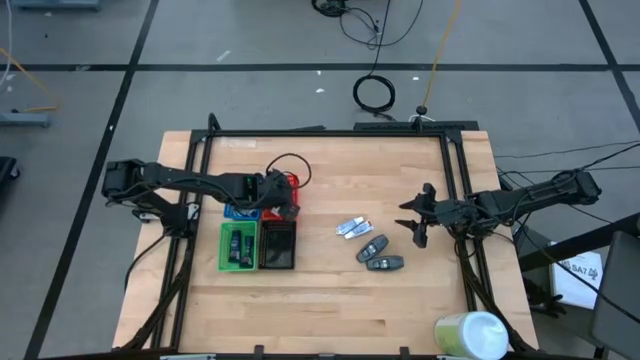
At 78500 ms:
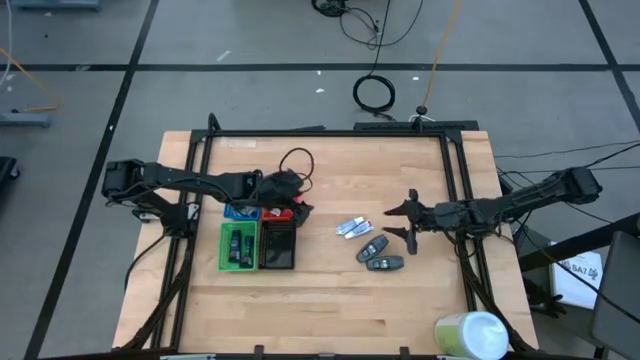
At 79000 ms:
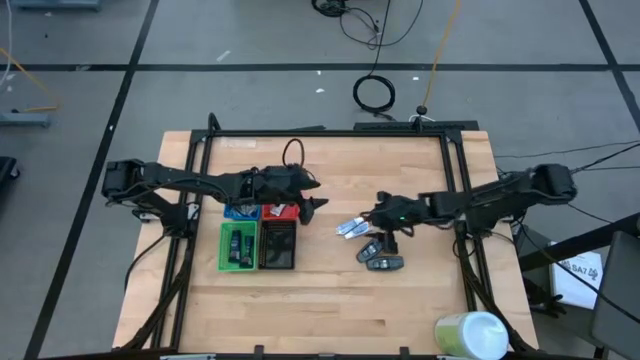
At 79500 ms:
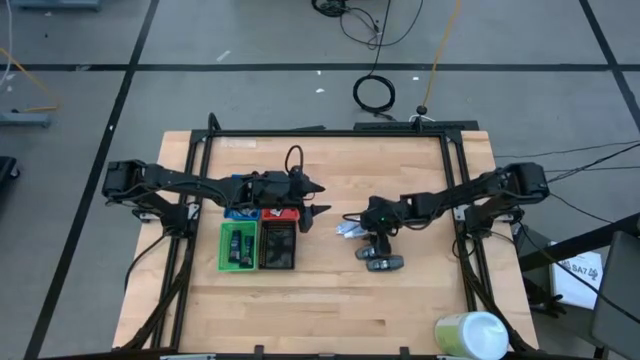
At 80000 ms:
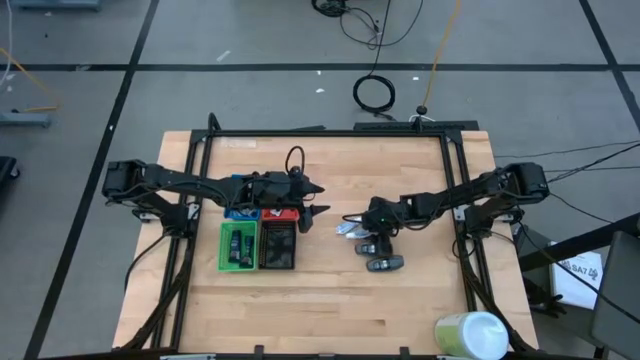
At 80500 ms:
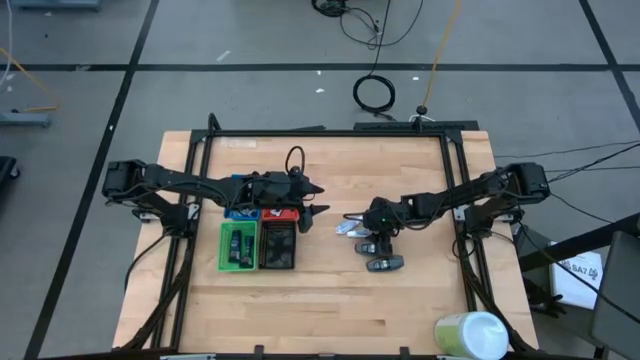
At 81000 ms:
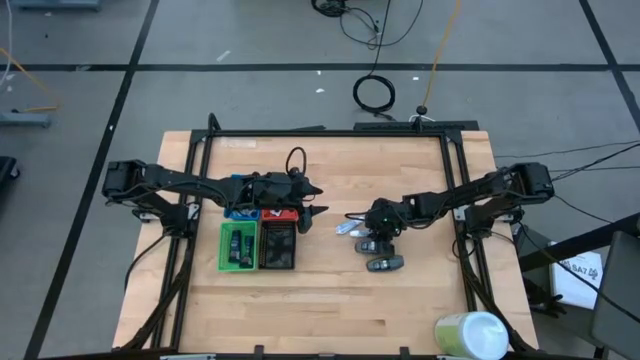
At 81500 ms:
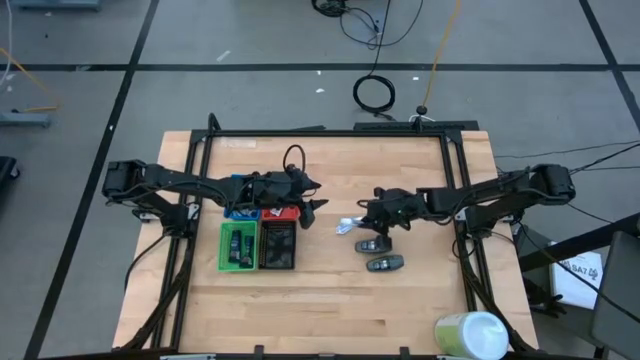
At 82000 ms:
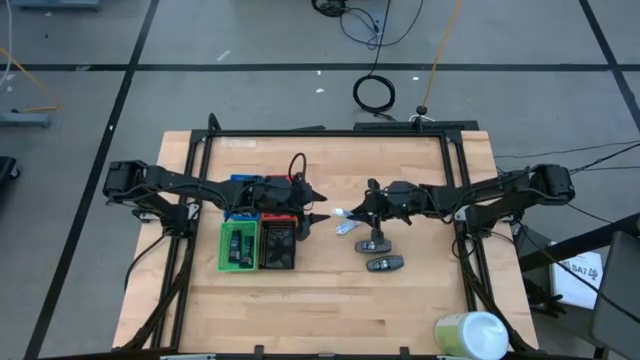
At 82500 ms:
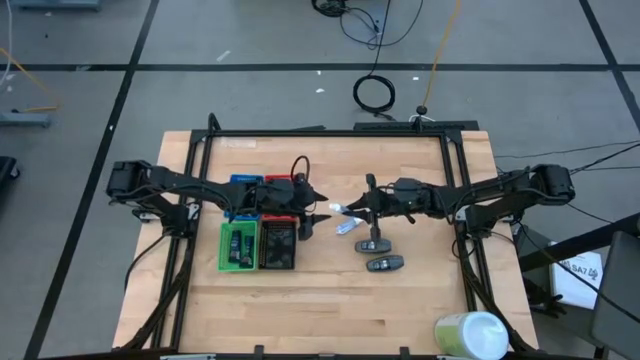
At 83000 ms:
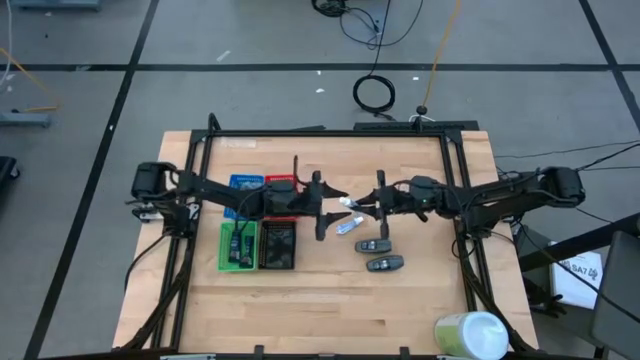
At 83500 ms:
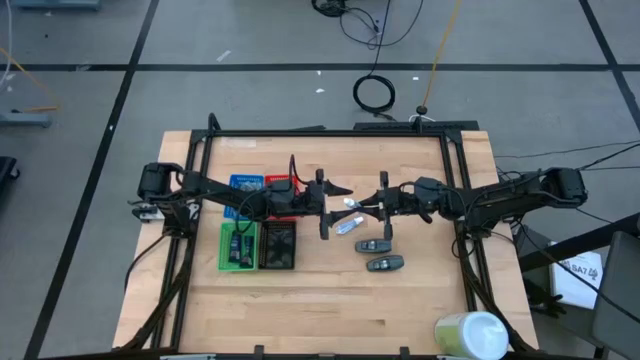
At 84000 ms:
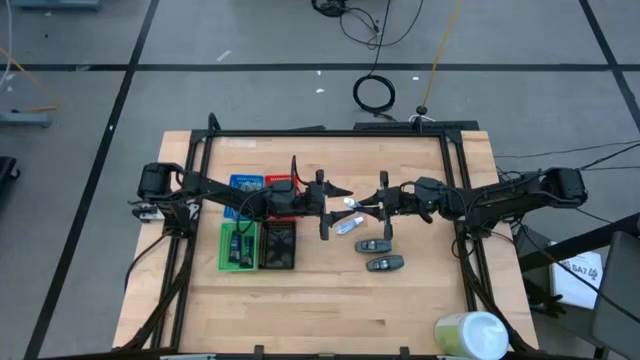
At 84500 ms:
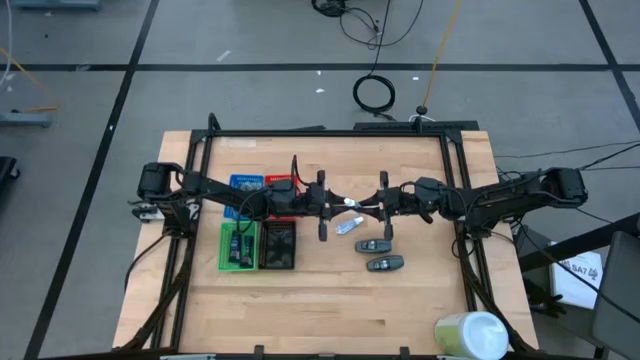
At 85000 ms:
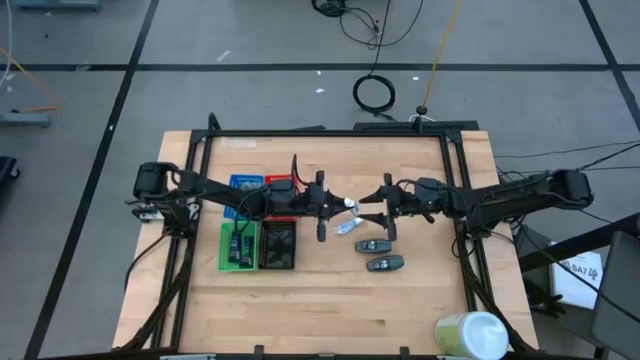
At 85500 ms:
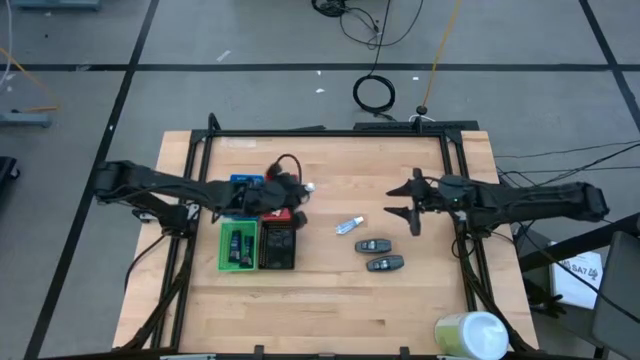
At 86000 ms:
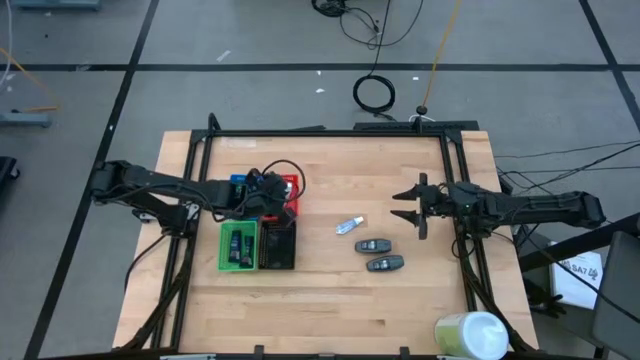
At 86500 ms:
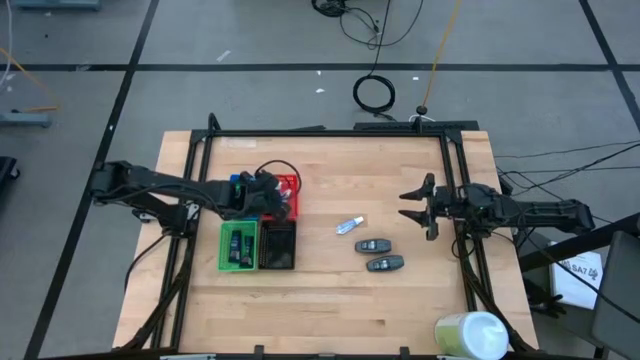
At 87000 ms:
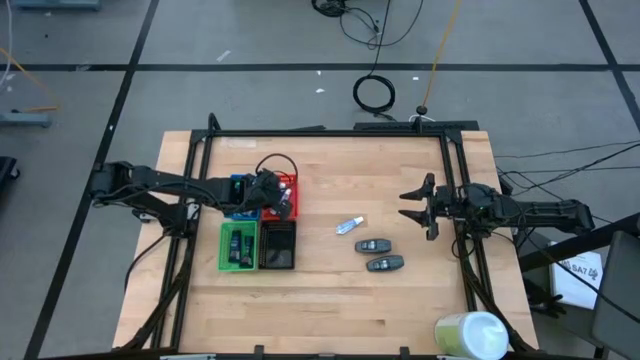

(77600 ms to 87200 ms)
Task: Pick & Place Travel size toiletries
Put the bottom white toothpaste into the red bin

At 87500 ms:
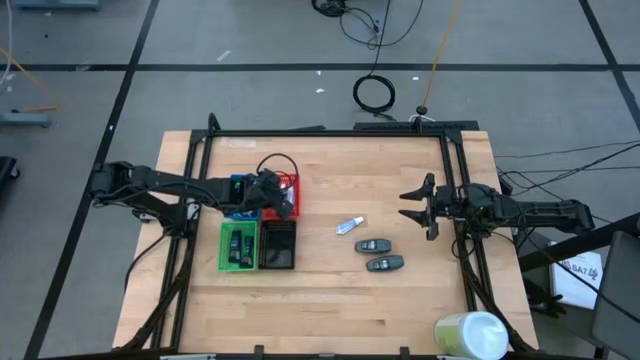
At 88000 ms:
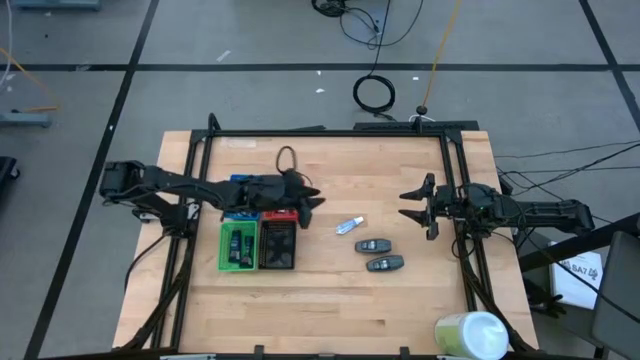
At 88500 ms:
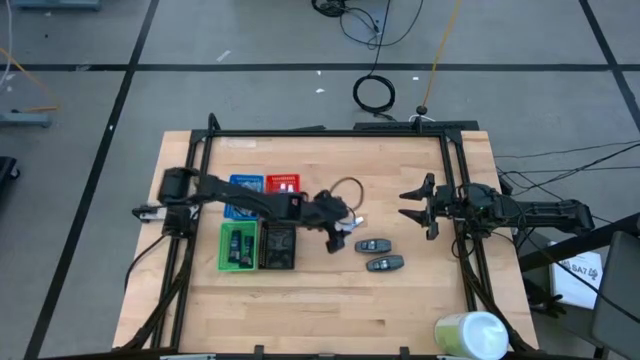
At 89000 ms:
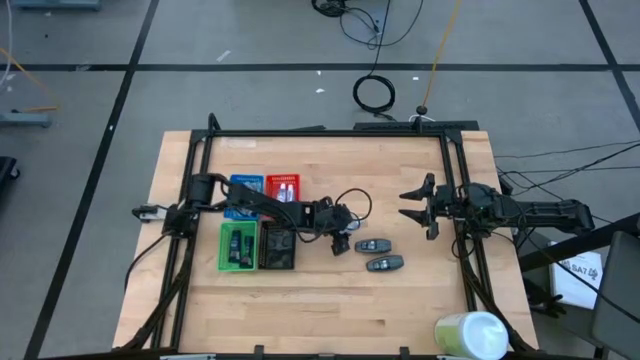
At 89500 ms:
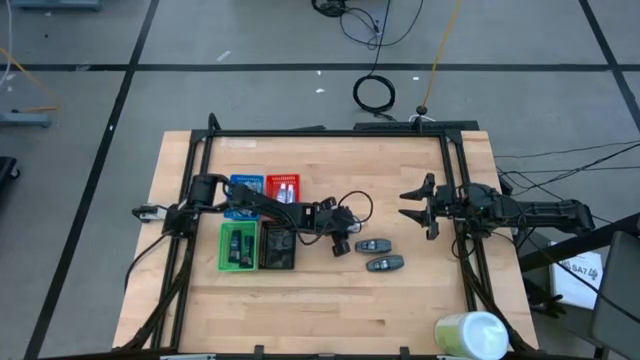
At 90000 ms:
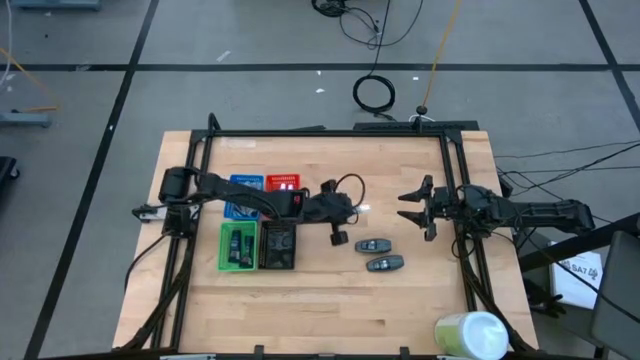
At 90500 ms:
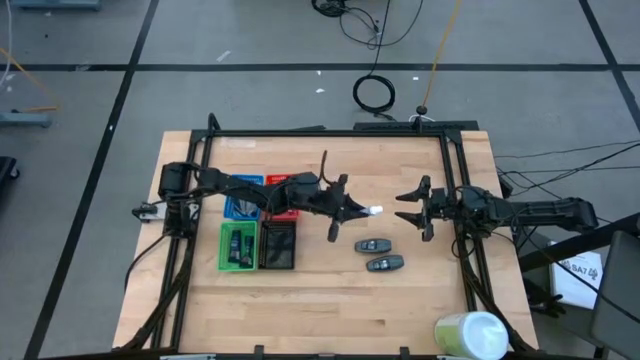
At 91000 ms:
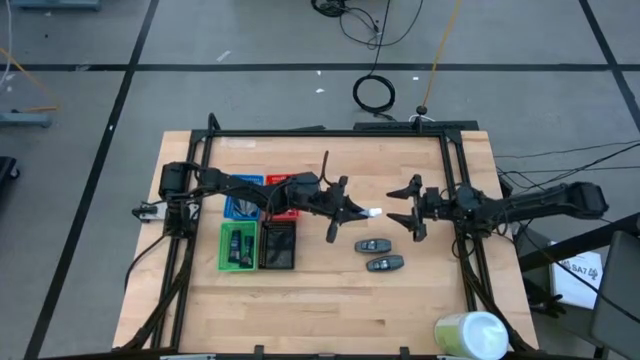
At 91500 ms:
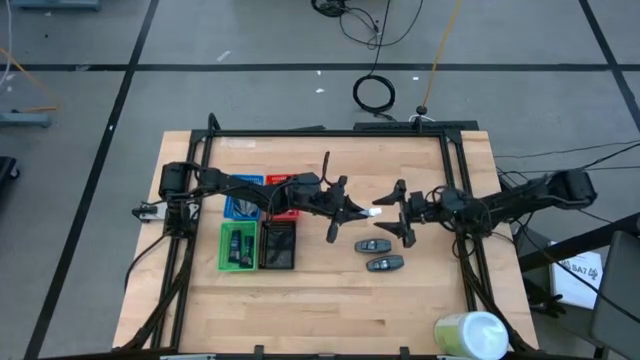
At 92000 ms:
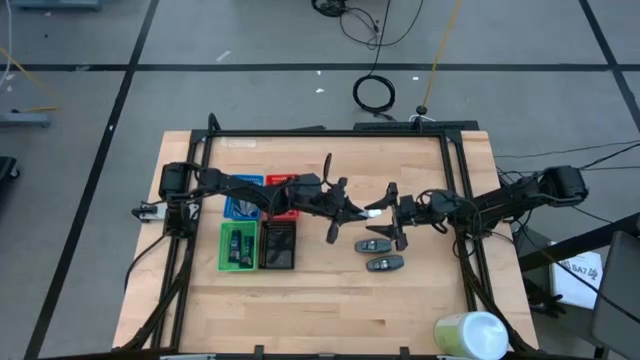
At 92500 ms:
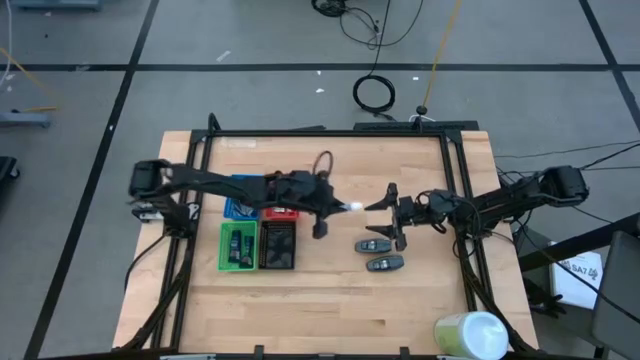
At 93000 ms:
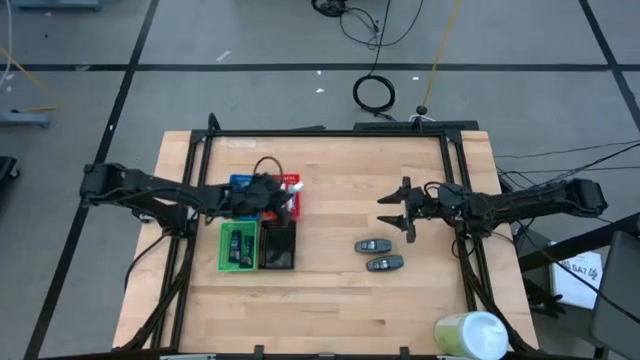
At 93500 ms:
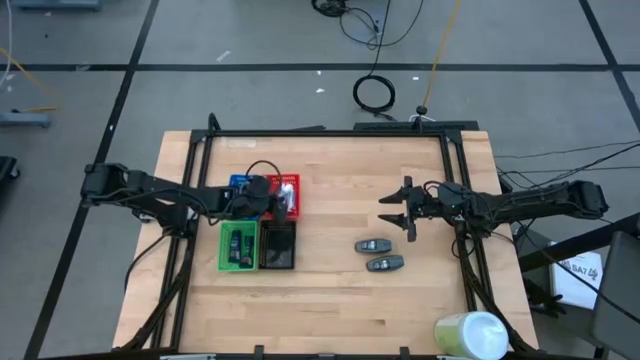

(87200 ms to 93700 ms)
Put the white toothpaste into the red bin

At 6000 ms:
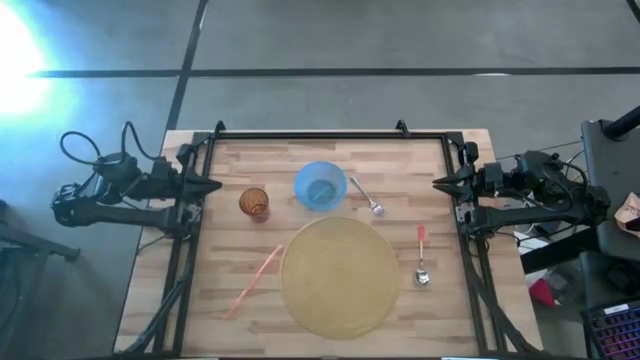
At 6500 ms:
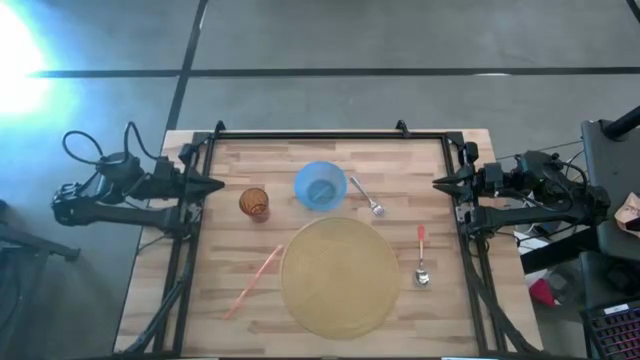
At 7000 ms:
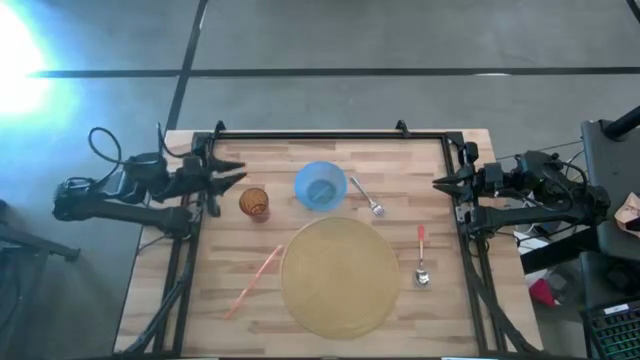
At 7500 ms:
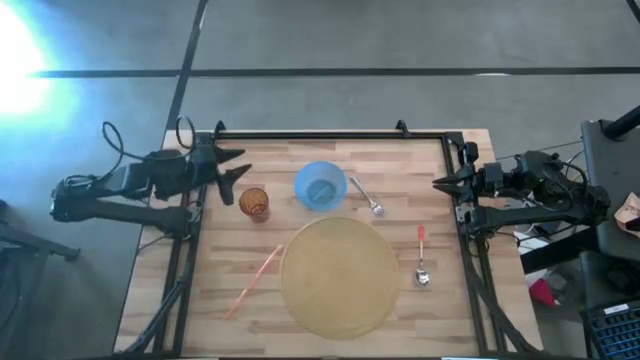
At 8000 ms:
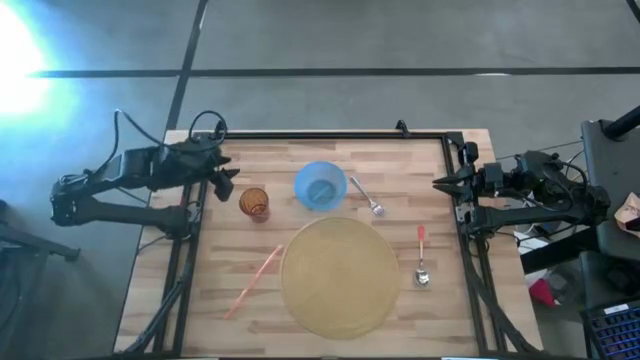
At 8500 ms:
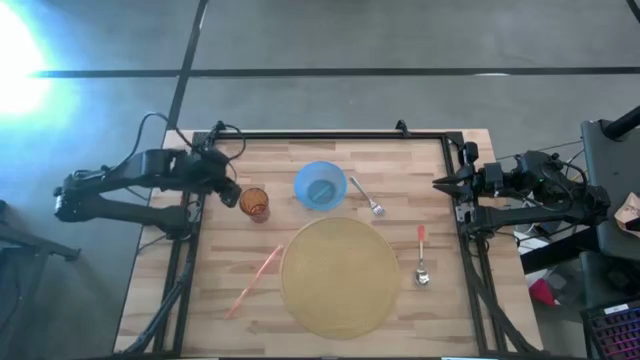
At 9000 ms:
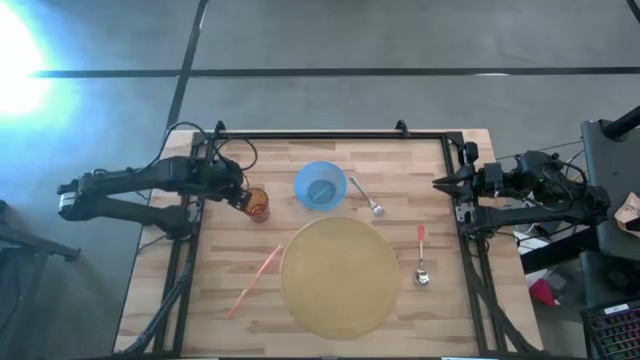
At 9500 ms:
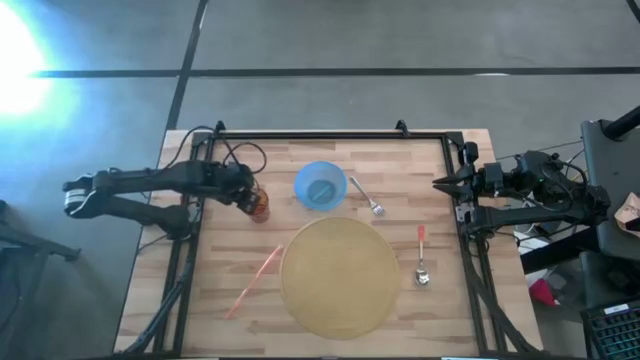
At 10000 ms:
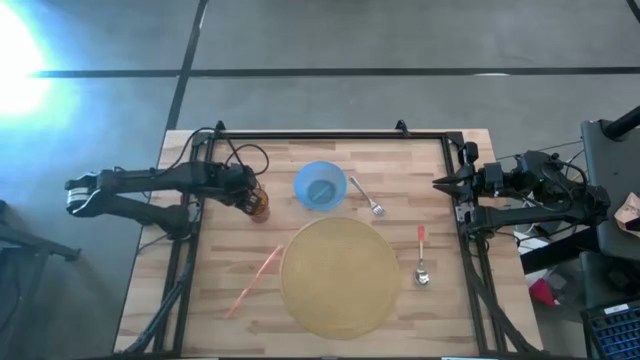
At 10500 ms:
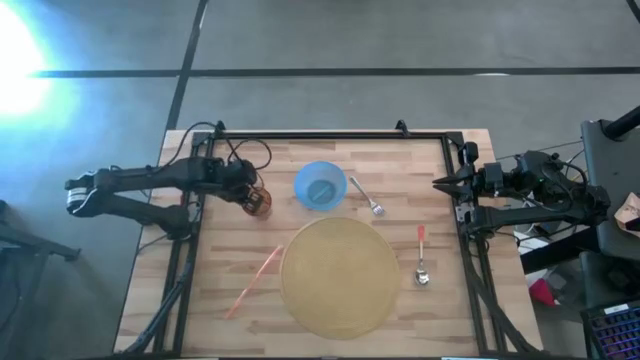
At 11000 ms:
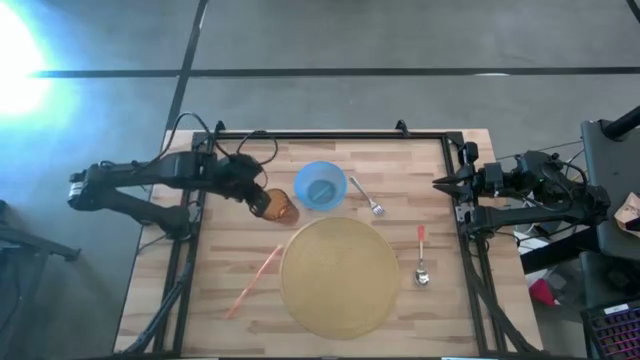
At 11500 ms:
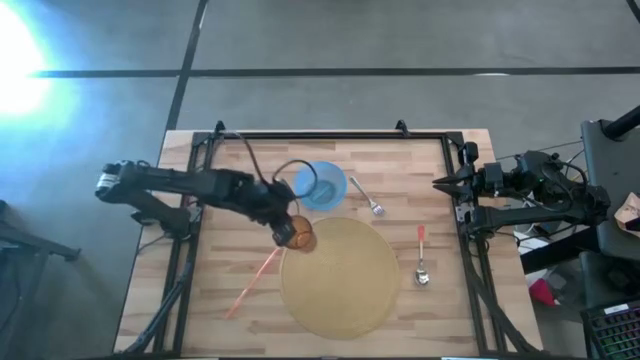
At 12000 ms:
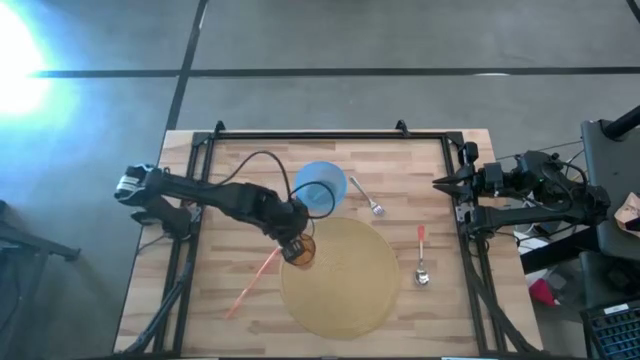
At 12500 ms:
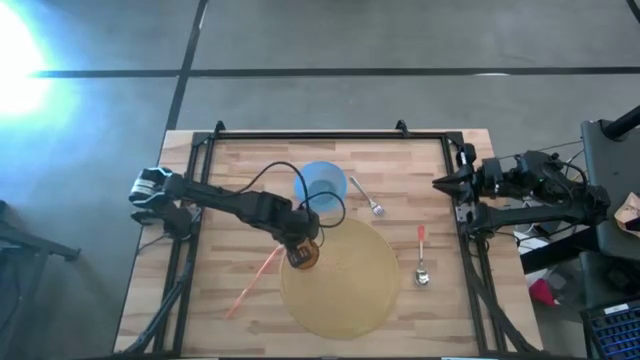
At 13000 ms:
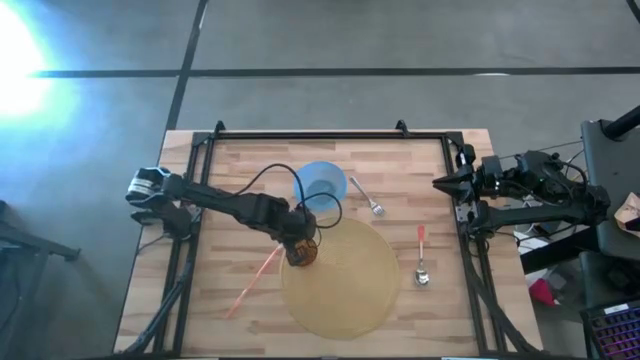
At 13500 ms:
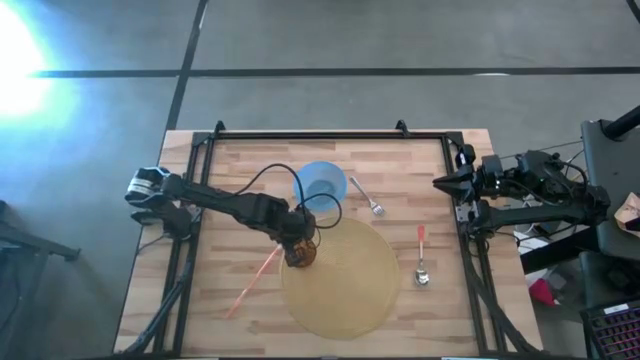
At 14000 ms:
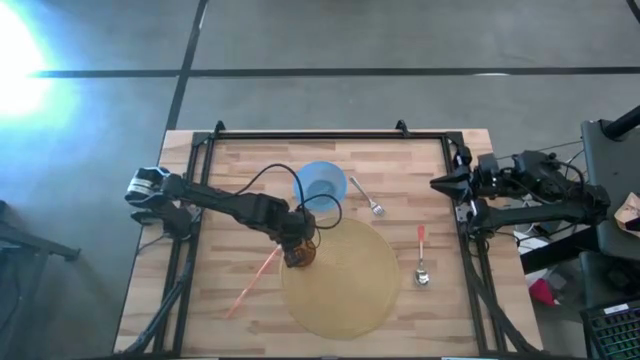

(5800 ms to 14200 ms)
Task: Pick & Place Utensil
Put the brown cup on the brown mat
